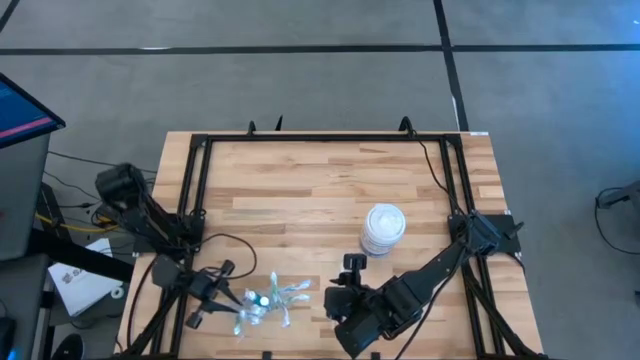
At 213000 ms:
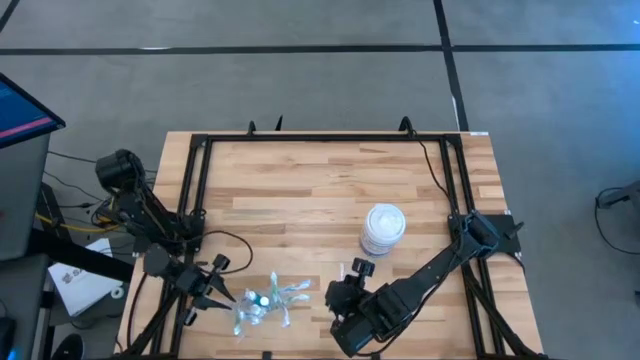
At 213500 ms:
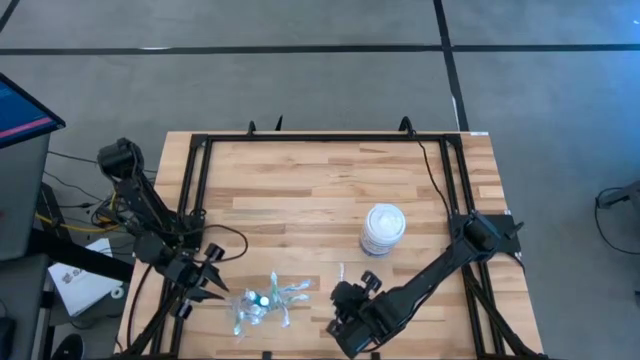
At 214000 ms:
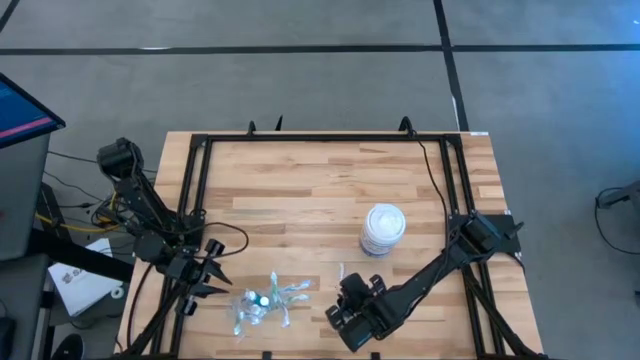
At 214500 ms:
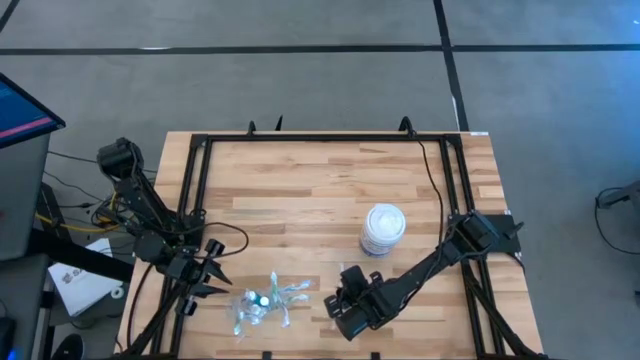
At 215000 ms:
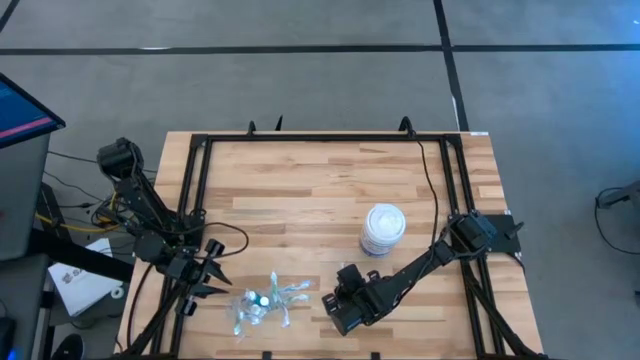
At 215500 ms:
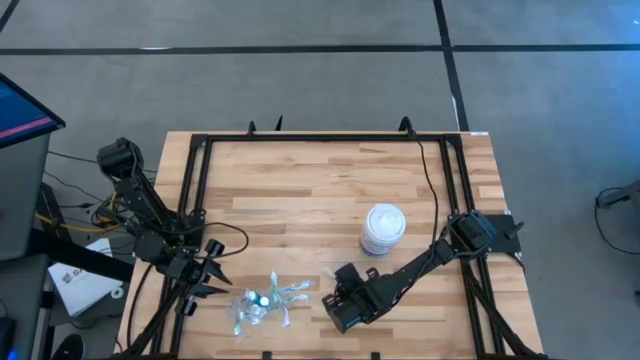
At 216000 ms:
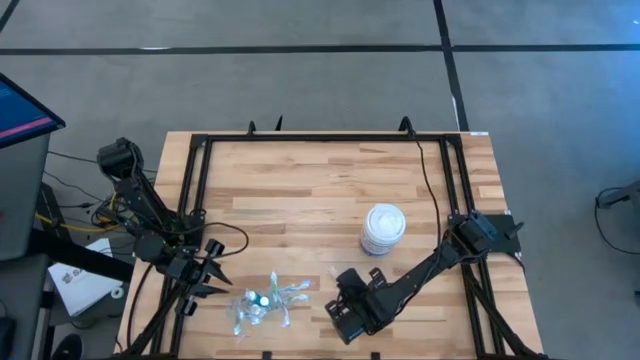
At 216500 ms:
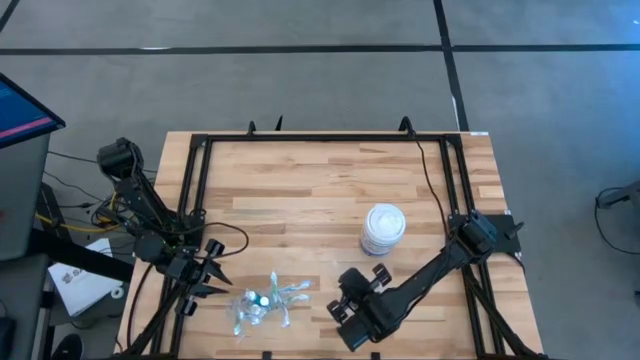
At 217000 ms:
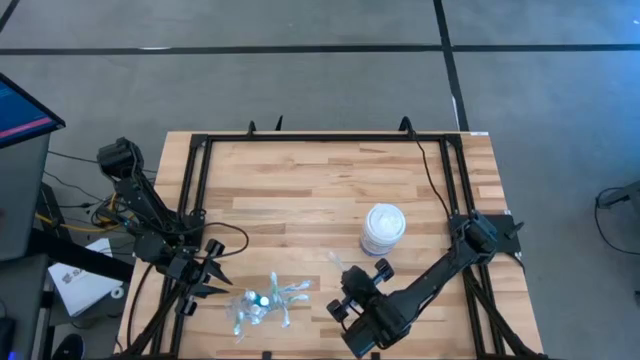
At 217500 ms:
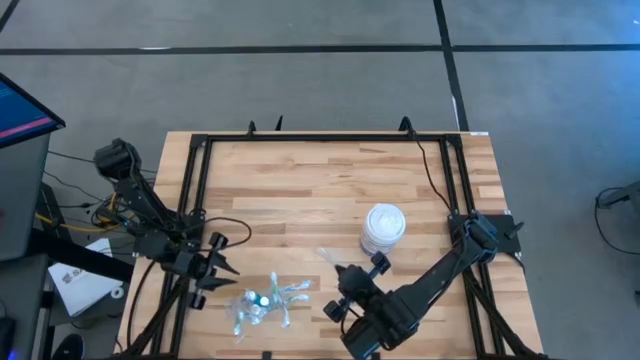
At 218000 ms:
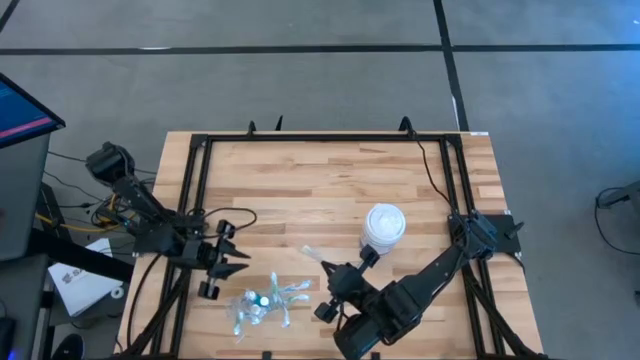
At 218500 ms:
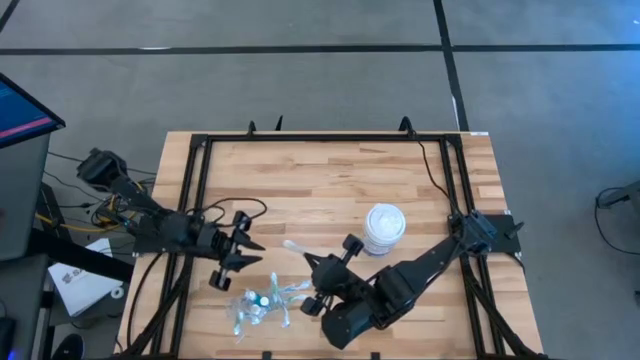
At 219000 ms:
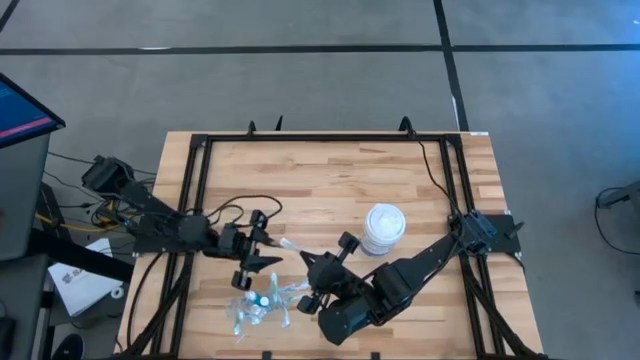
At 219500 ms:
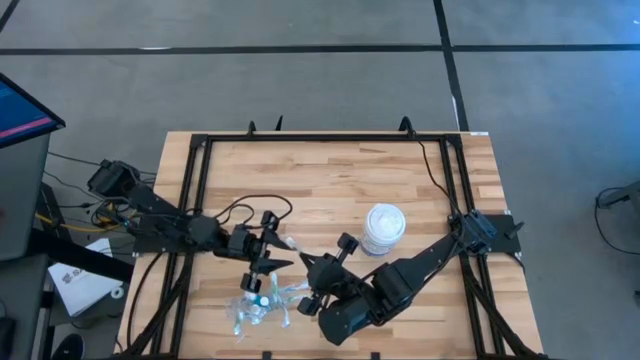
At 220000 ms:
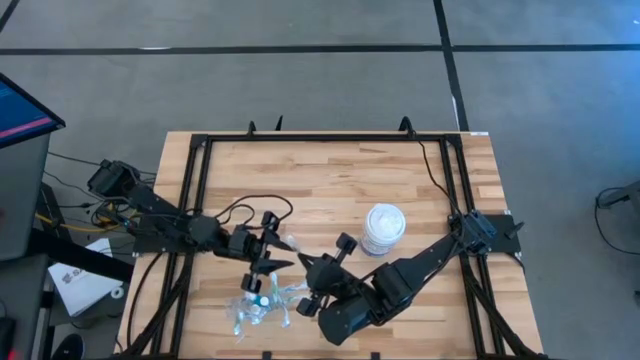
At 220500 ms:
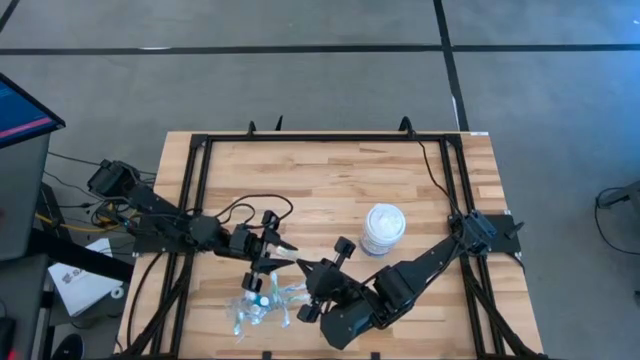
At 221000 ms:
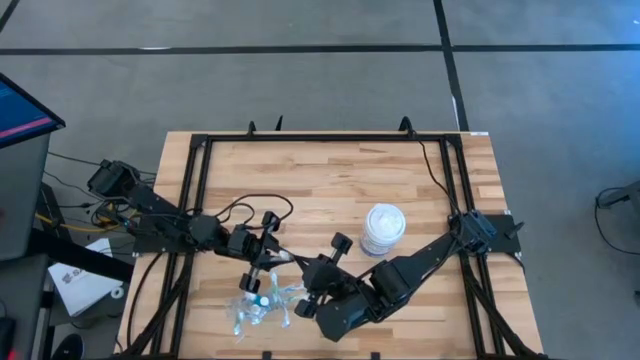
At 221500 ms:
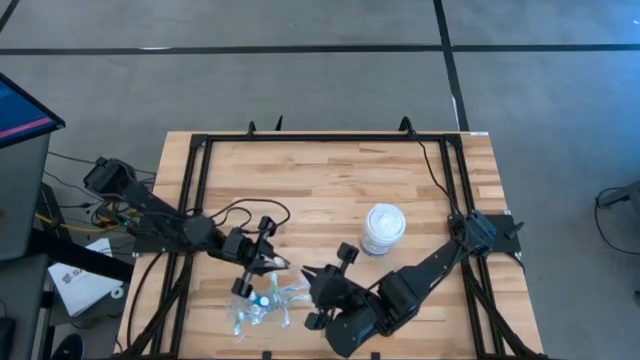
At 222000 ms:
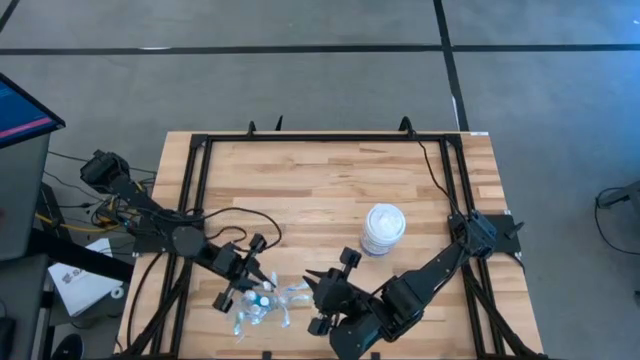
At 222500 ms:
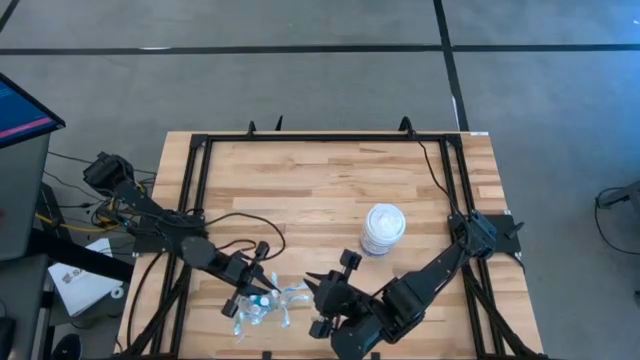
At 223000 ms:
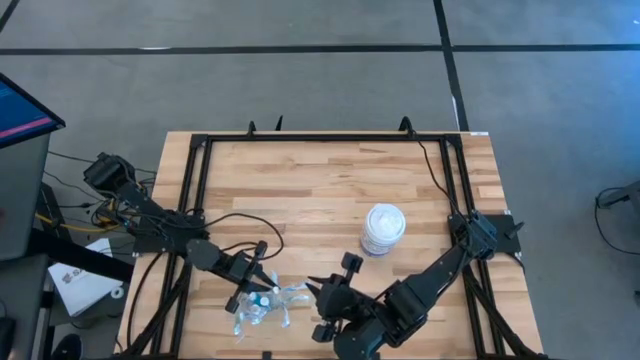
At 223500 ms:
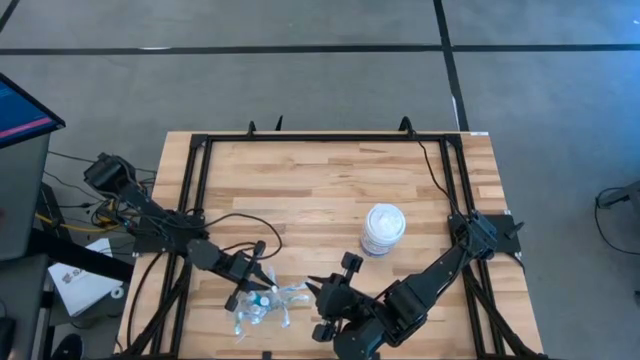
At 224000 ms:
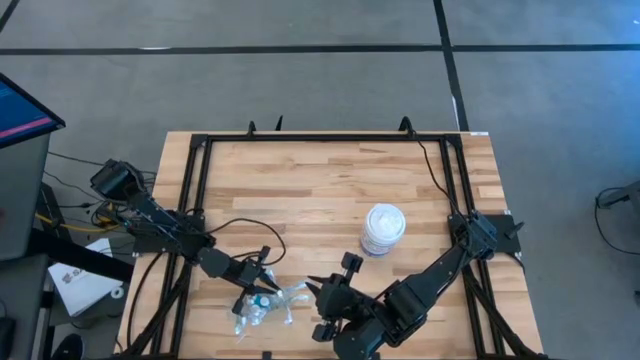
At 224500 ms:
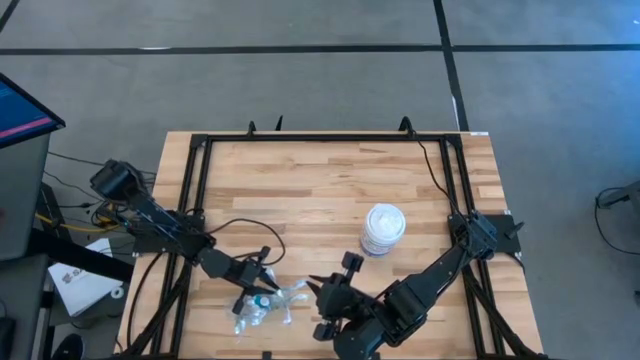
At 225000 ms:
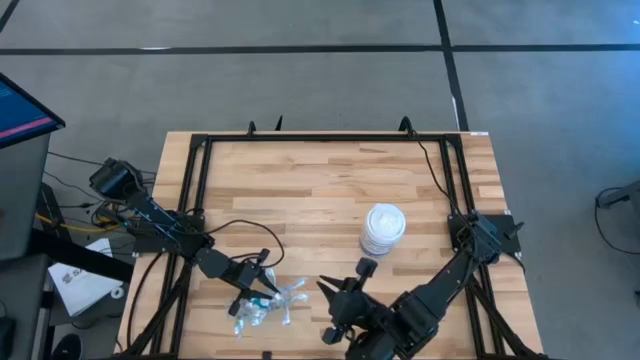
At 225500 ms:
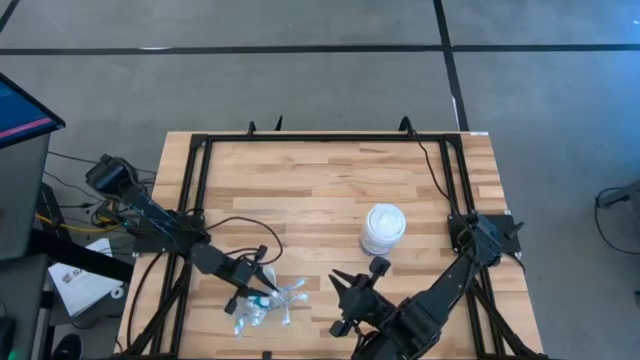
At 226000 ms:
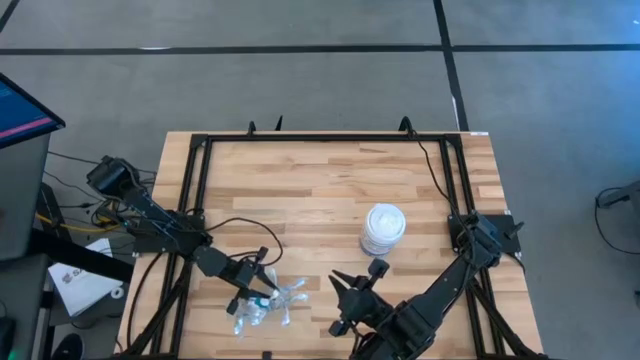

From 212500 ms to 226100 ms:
Task: Pick & Place toothbrushing station
Put the orange toothbrush into the transparent organizer

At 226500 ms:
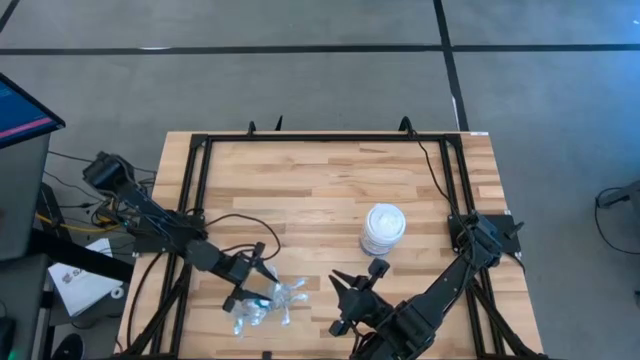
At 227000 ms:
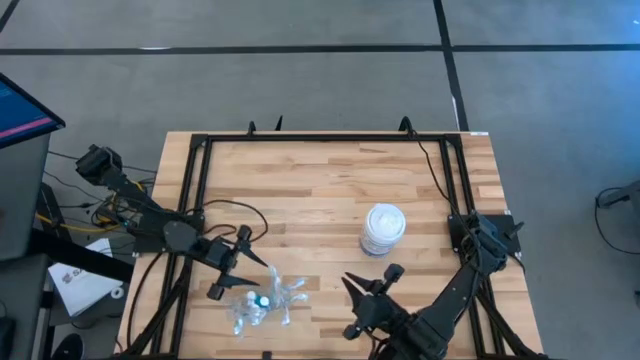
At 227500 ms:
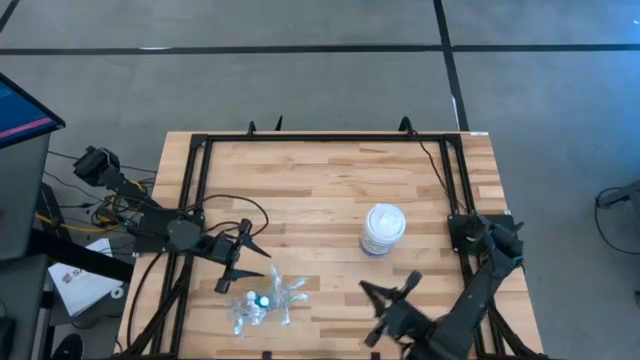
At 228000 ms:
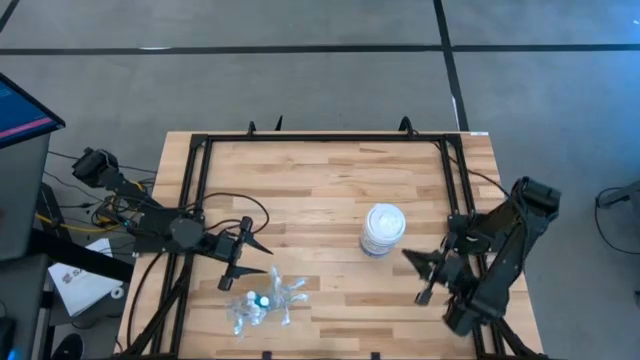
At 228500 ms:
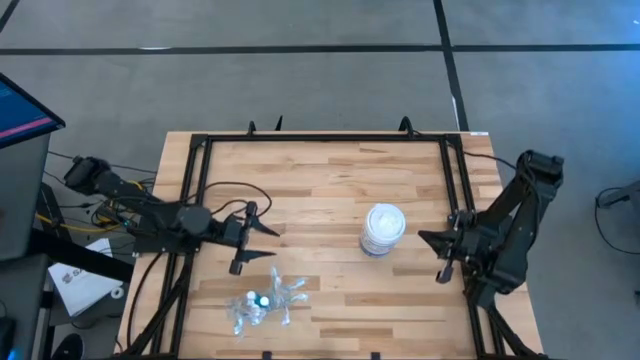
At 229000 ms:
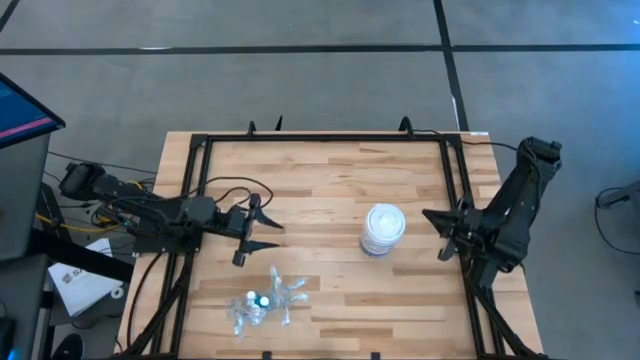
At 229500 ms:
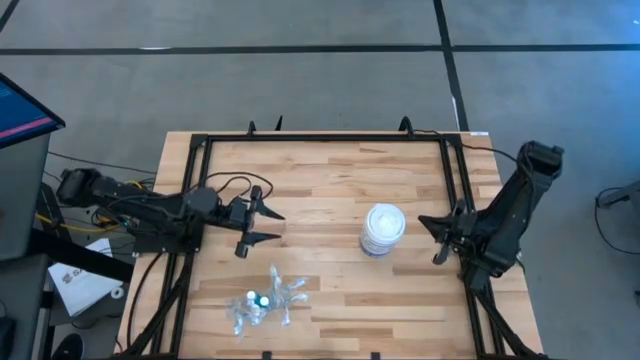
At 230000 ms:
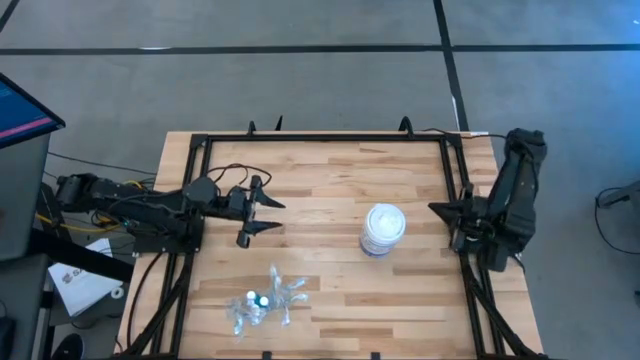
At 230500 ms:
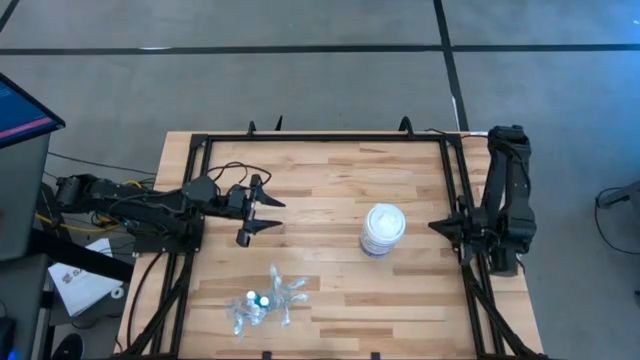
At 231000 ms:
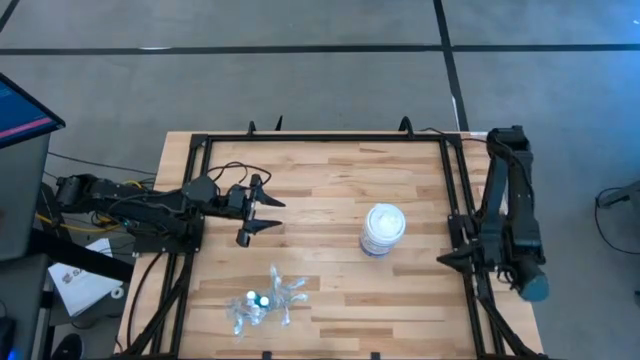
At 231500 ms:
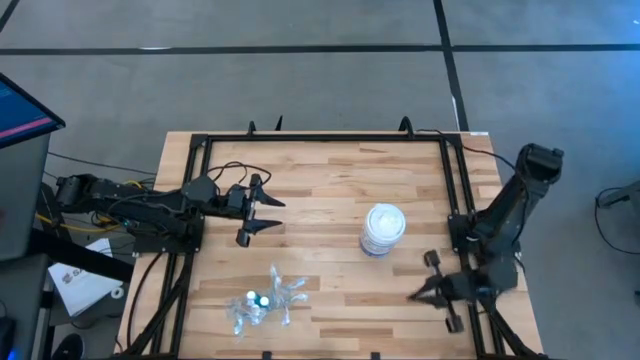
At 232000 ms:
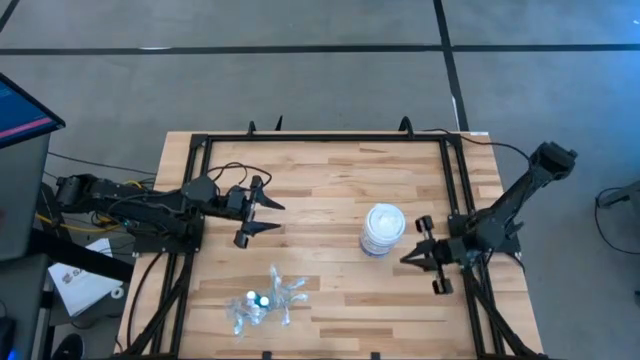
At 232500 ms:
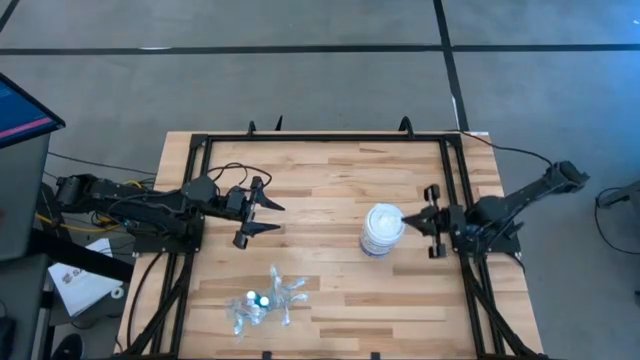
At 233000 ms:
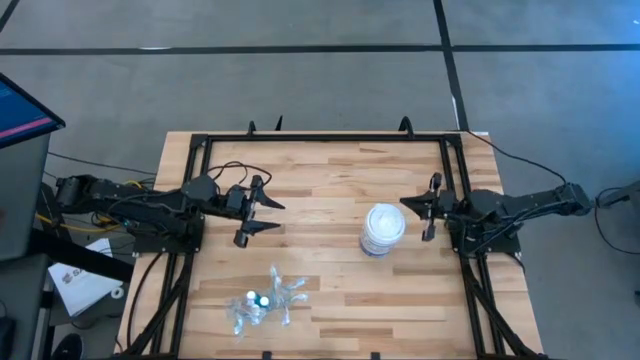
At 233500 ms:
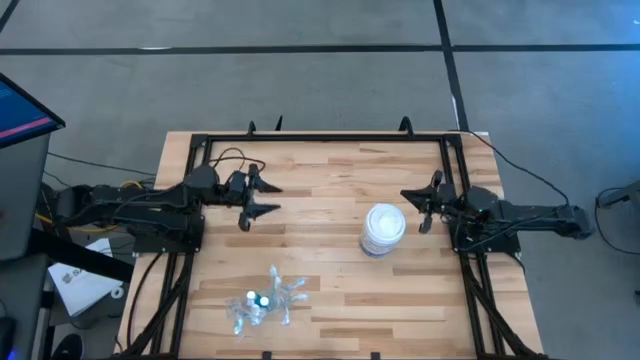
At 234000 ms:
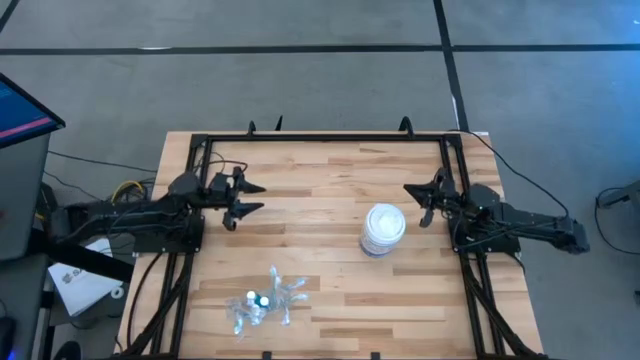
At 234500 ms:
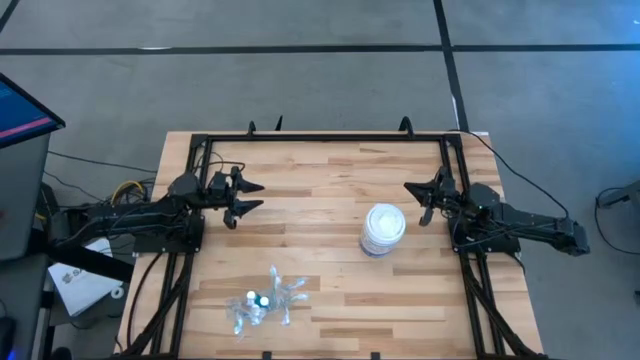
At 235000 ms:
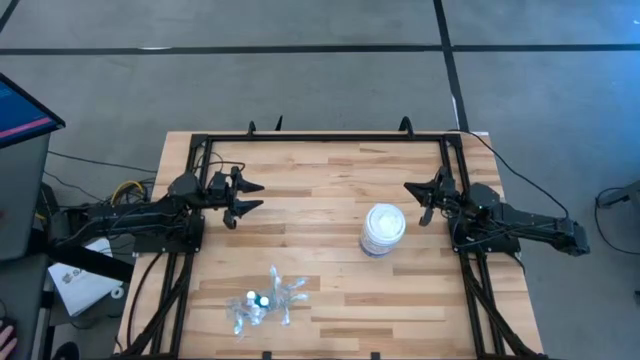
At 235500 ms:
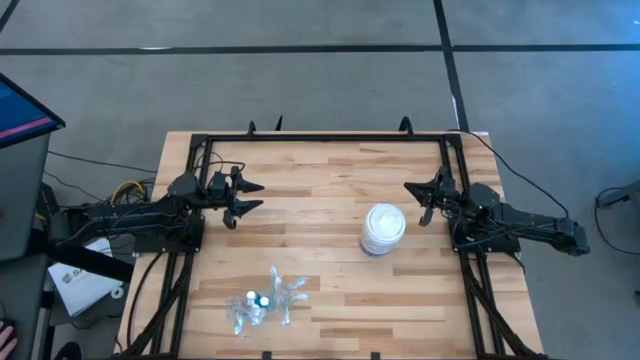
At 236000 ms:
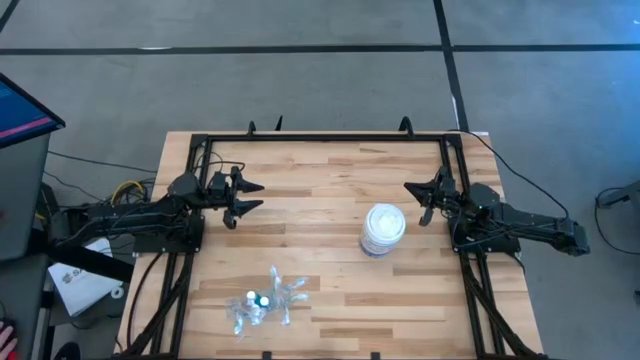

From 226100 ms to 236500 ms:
Return to Home Position
